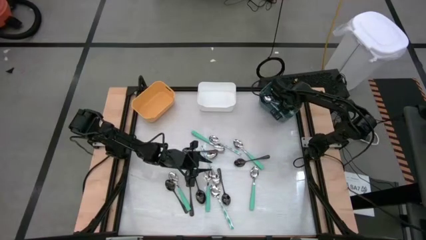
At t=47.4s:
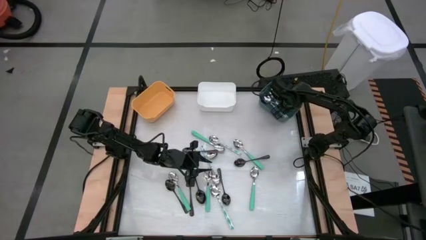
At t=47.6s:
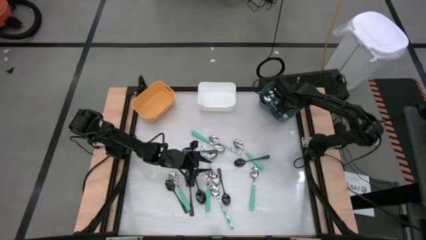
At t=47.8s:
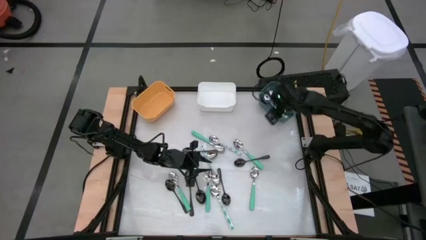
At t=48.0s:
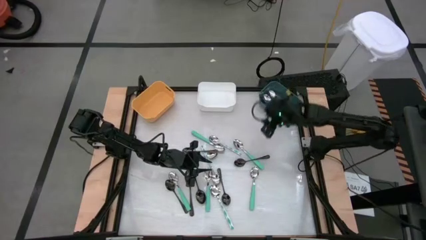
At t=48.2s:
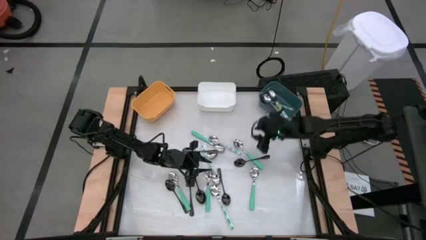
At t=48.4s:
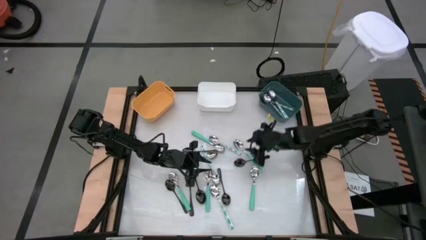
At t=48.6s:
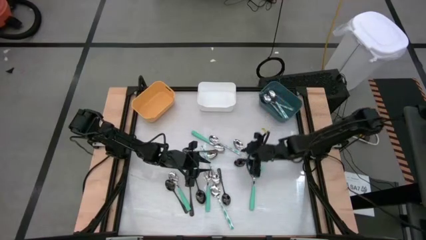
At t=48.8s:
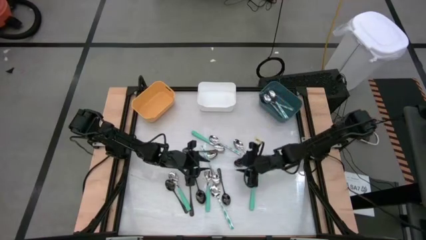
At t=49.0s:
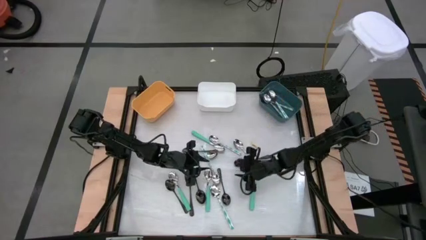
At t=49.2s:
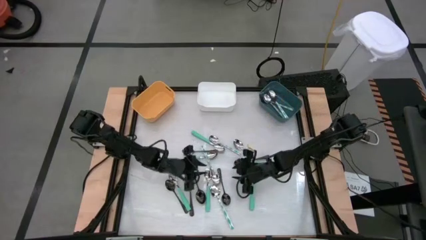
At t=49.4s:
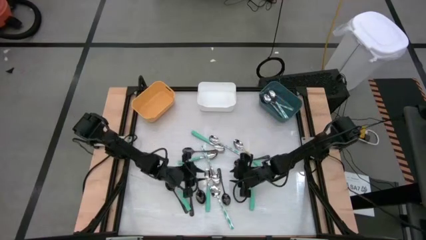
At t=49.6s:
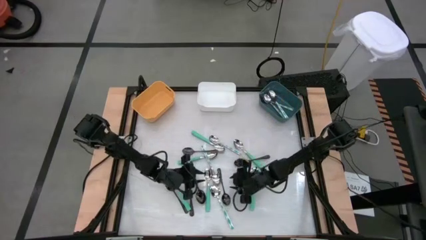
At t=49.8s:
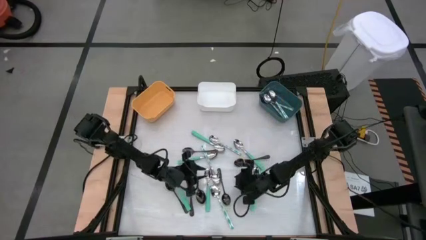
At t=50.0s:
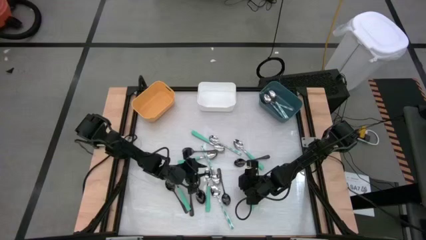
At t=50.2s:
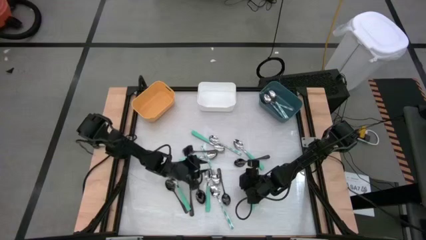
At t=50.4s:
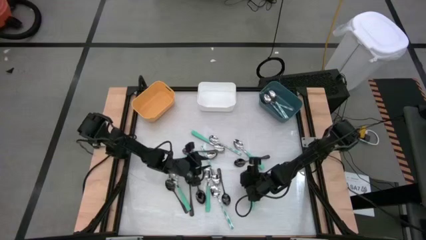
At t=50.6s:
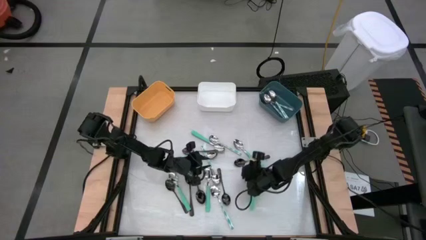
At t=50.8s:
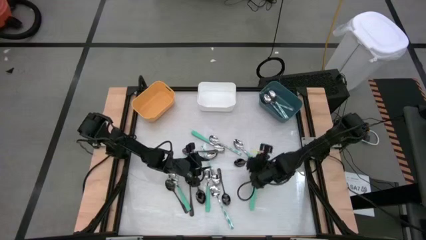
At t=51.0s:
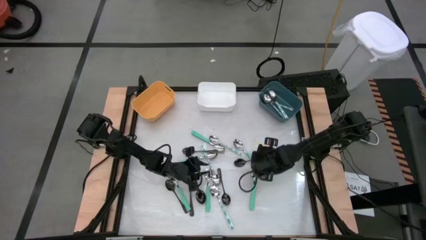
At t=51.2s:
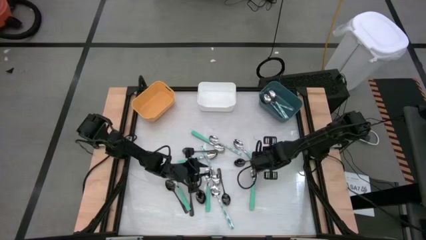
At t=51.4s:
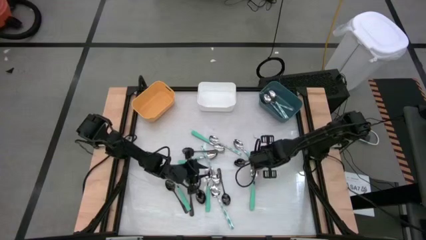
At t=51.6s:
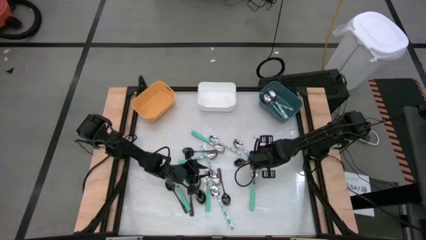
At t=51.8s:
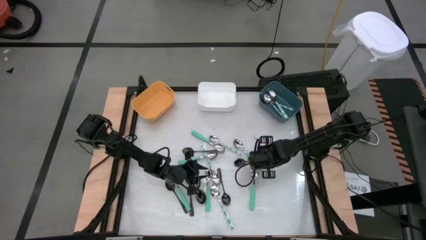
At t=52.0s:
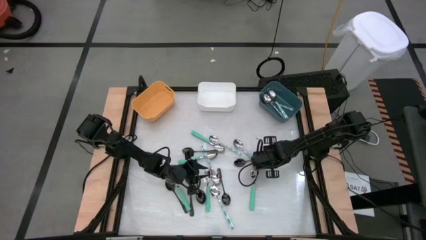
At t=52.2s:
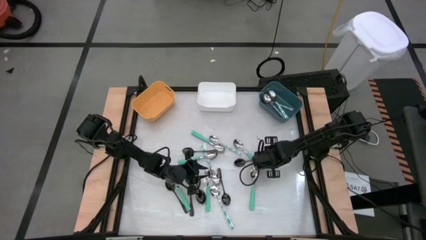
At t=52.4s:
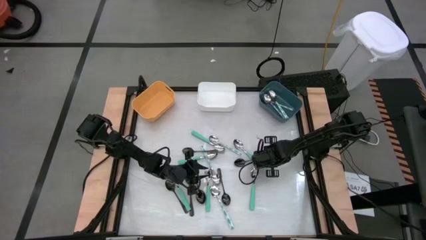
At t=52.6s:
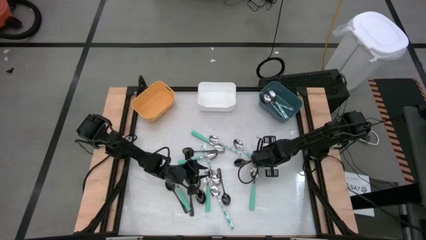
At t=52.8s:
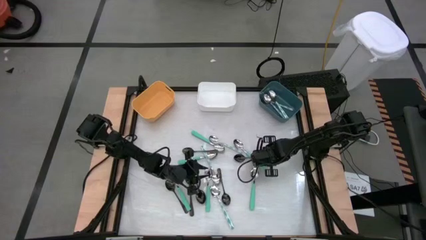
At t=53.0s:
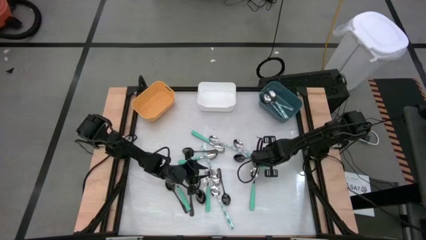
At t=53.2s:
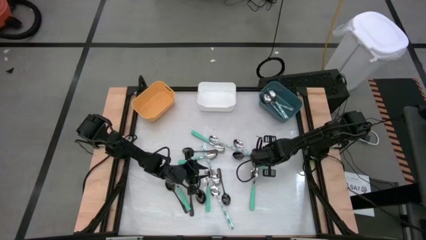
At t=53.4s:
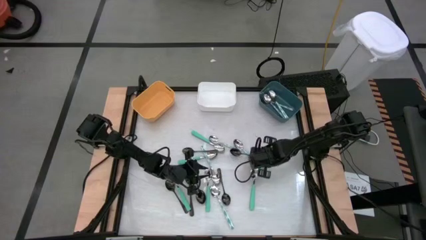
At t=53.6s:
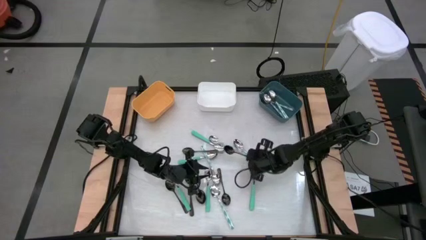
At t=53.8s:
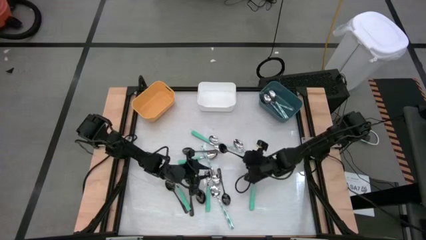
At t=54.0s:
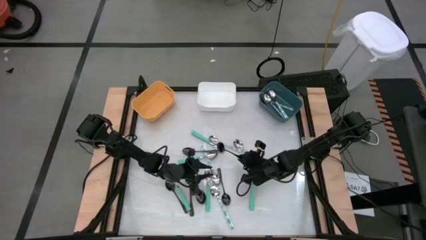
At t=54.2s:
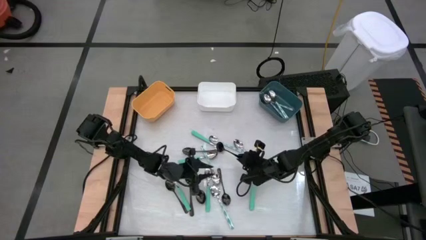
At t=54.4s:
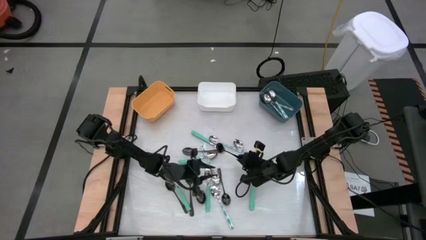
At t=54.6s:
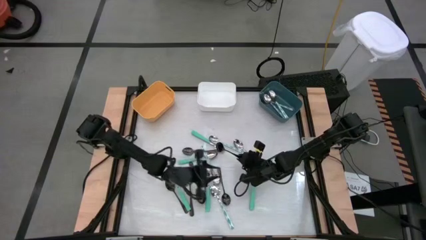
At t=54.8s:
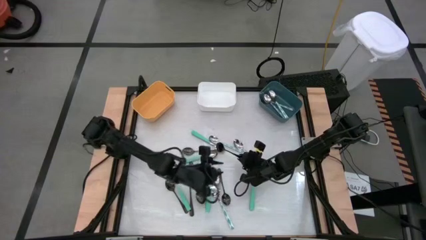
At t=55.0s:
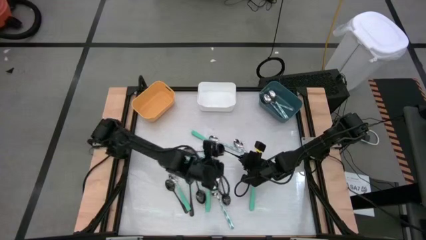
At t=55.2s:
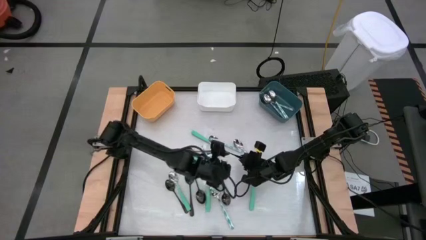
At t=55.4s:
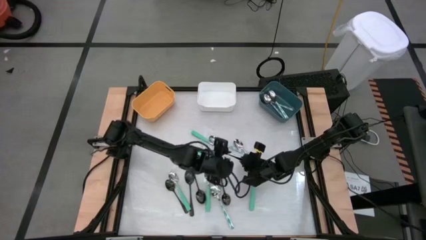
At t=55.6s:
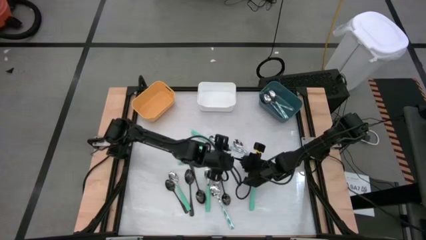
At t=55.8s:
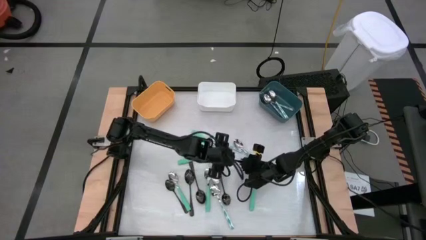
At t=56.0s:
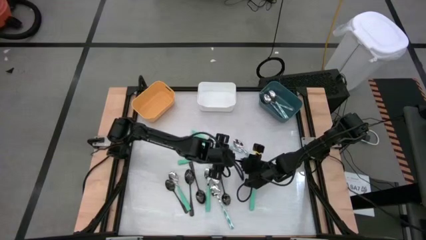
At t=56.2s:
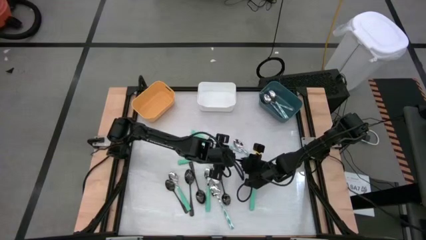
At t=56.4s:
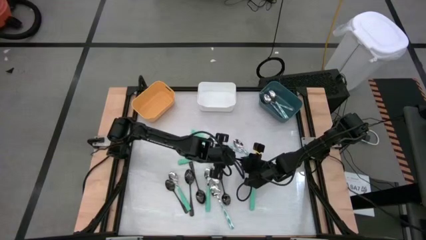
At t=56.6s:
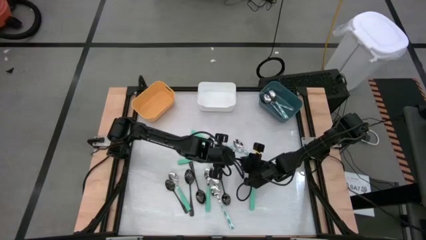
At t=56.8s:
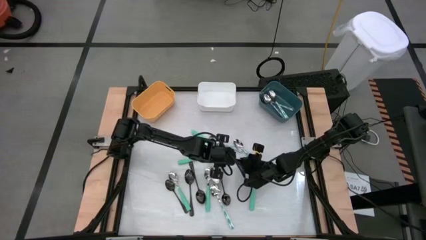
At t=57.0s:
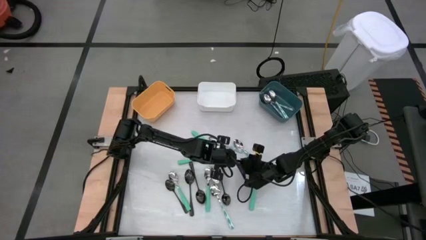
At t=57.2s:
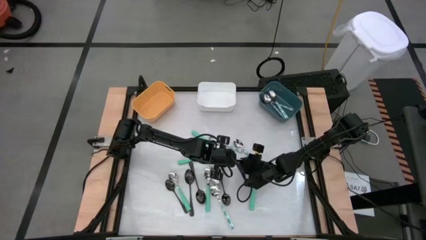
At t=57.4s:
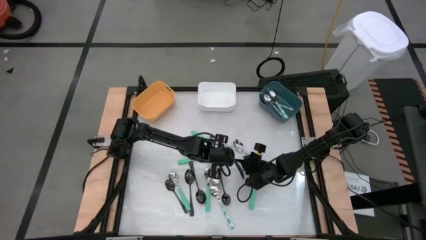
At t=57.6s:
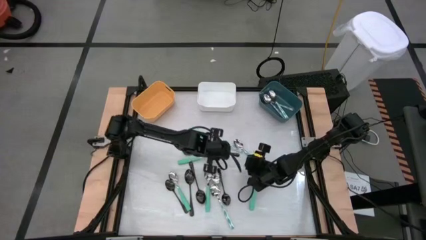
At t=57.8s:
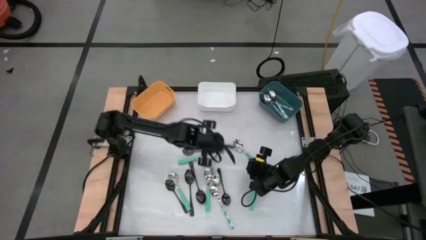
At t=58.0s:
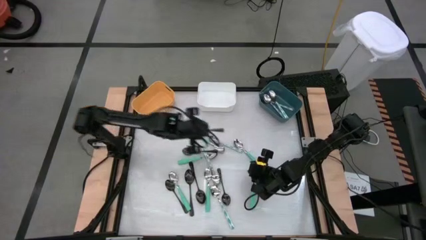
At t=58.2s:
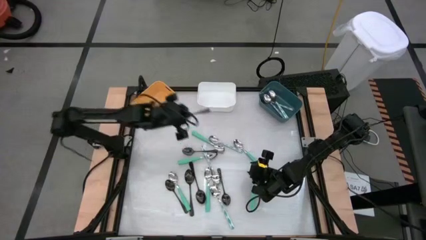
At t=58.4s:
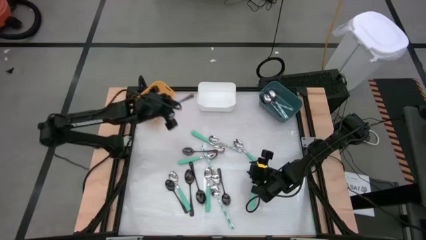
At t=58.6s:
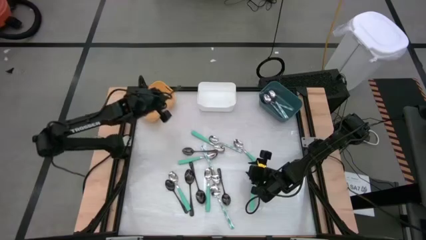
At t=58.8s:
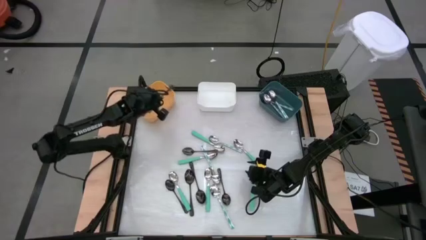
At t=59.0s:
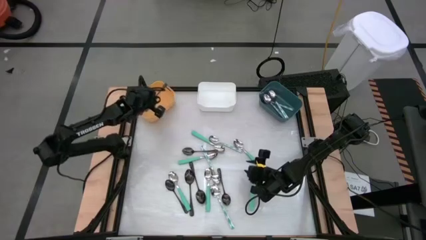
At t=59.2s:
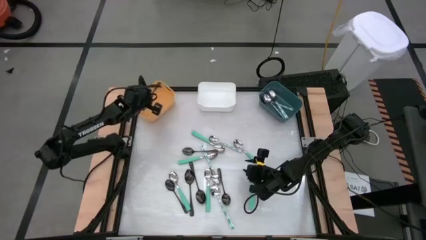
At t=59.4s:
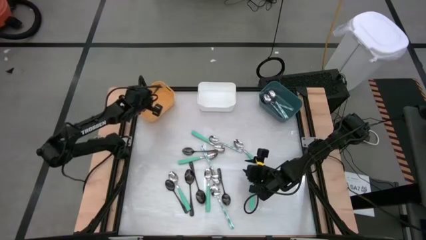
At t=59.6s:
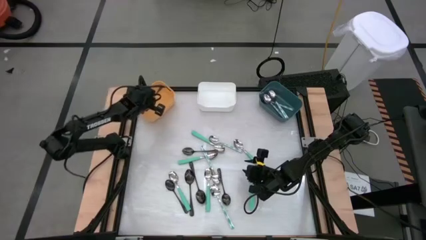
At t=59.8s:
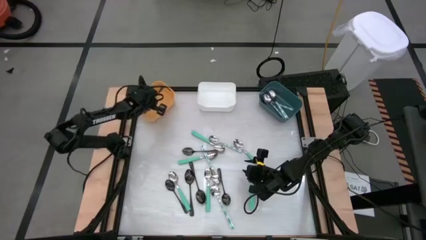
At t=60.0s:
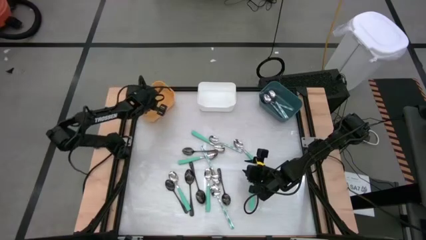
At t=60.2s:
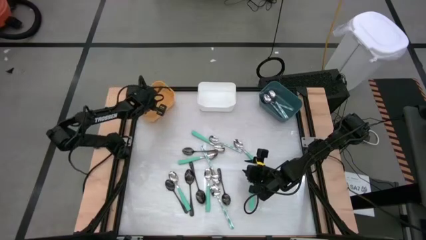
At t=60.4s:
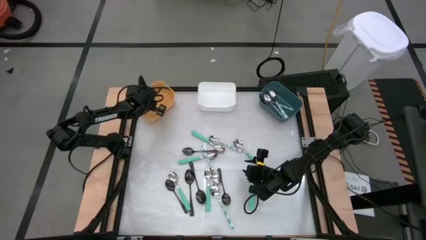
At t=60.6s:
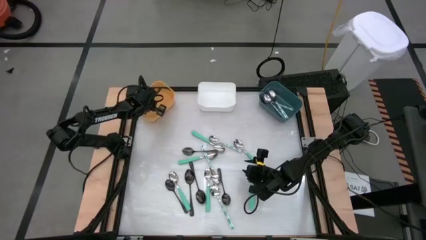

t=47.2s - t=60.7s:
Task: Sort silverware by color (type)
Put the black spoon into the orange bin

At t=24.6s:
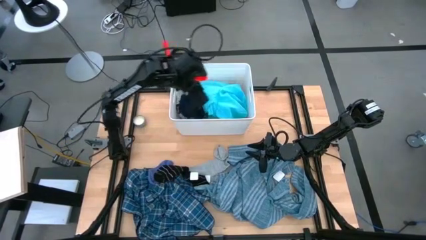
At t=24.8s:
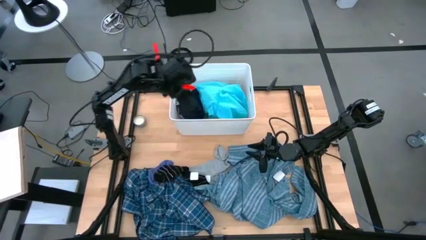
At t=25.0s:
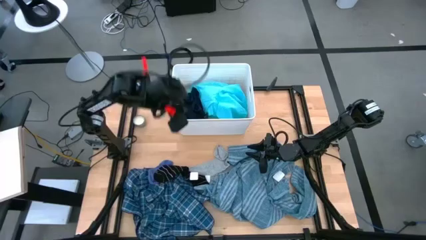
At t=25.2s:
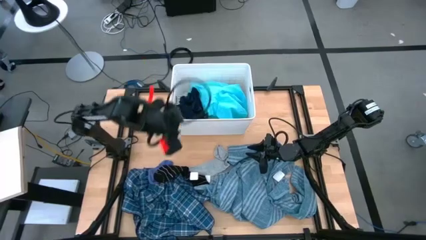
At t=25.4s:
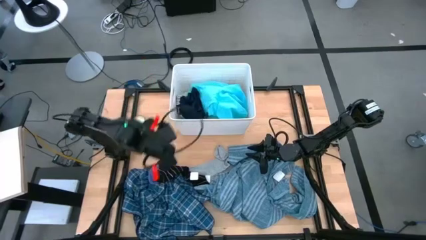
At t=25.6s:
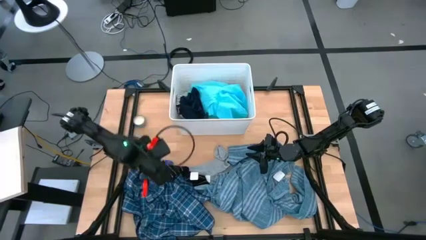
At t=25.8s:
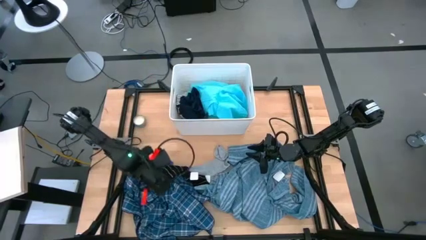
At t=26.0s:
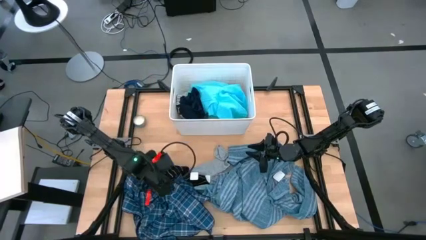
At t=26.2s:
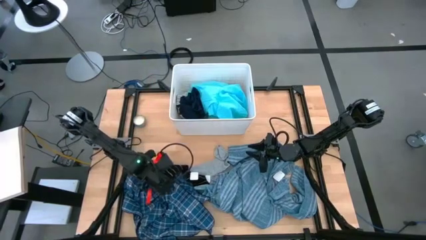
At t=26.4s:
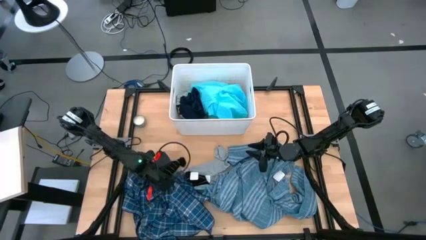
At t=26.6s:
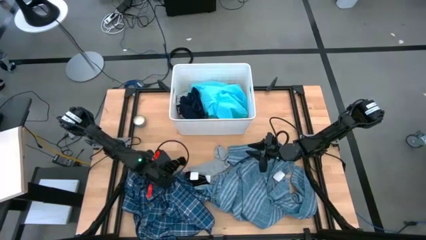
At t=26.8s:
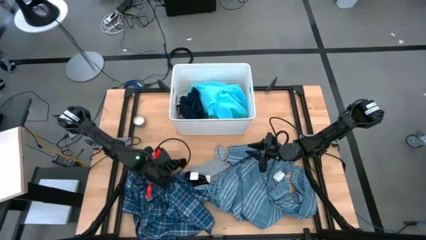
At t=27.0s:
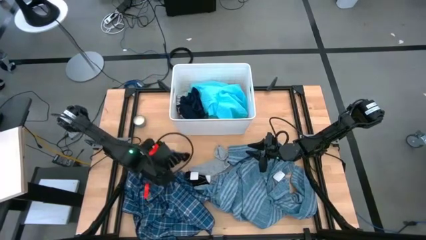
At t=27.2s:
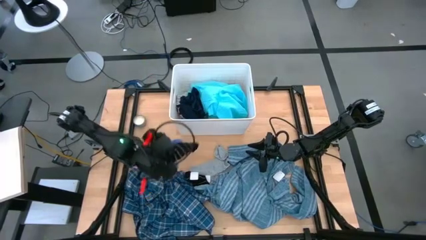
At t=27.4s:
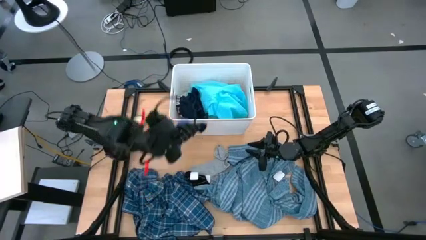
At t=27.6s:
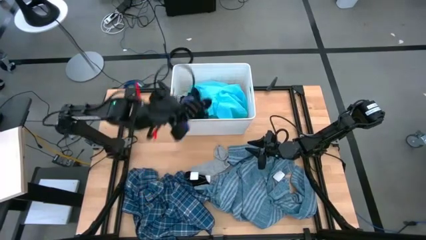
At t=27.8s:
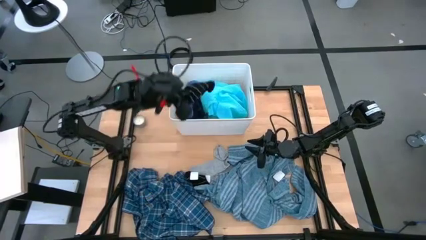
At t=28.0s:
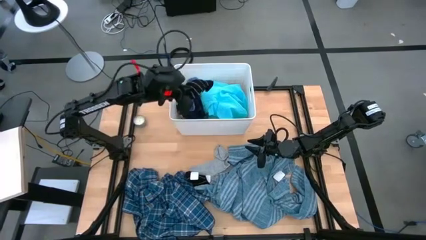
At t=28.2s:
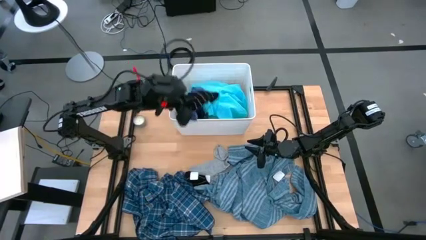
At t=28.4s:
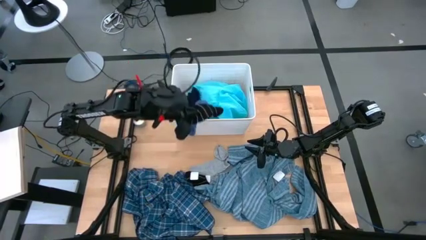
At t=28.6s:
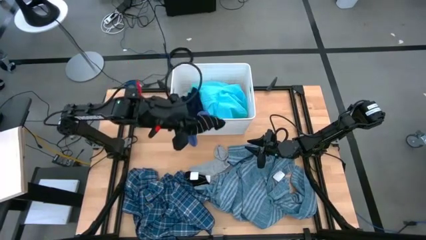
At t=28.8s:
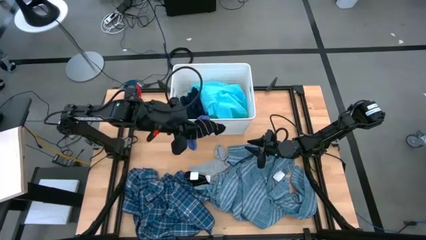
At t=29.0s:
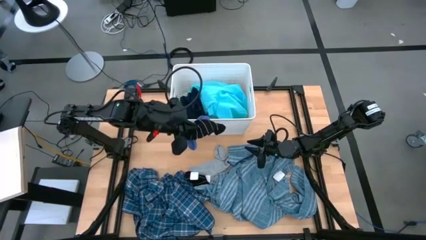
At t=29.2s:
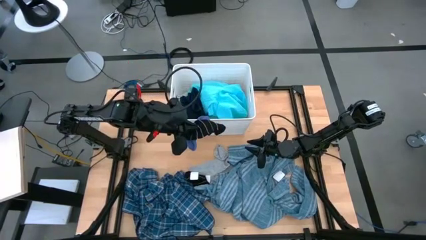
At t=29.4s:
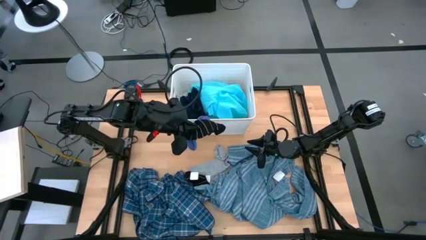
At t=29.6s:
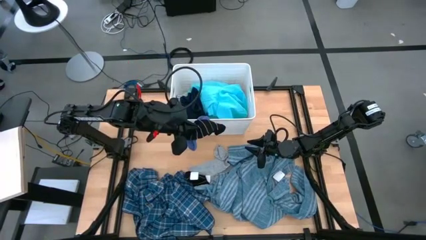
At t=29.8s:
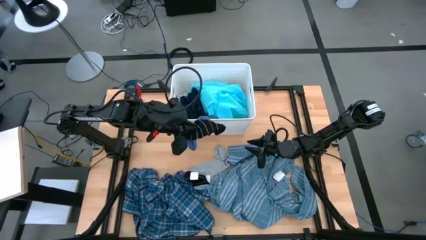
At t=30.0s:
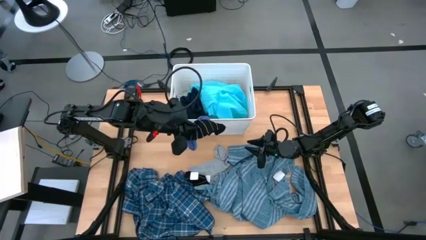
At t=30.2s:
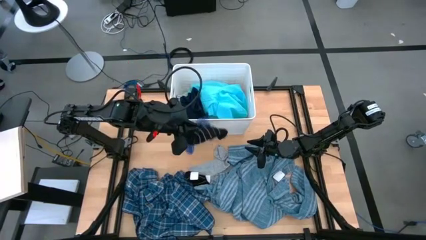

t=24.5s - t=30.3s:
Task: Sort clothes
Put the blue sock into the white bin
